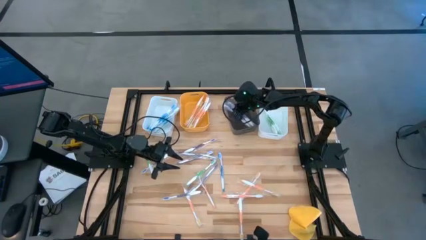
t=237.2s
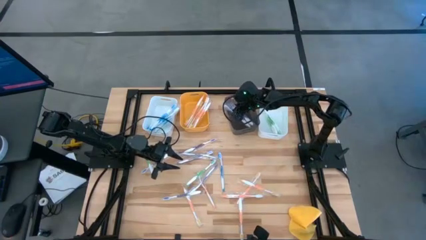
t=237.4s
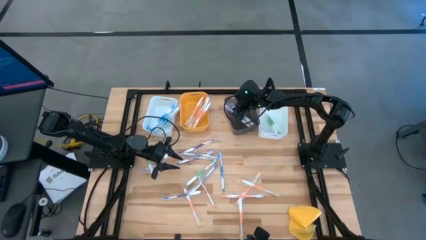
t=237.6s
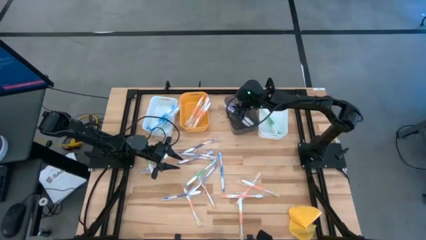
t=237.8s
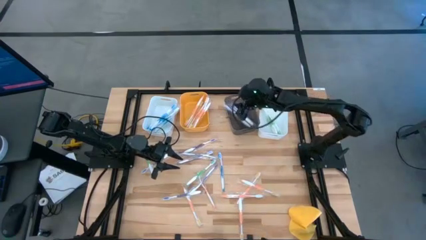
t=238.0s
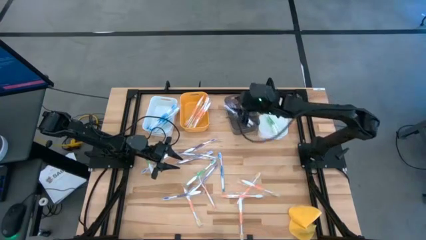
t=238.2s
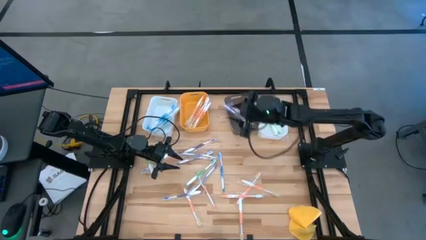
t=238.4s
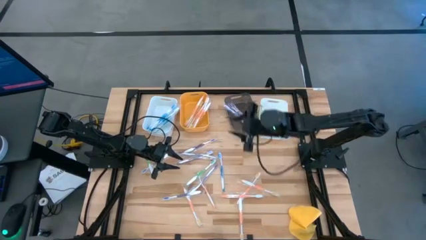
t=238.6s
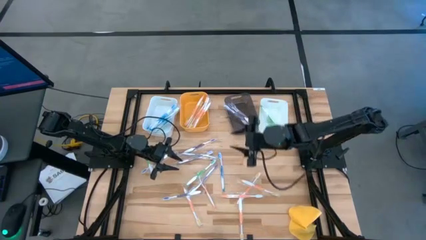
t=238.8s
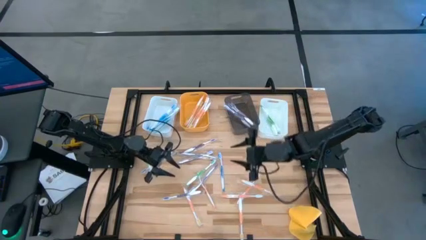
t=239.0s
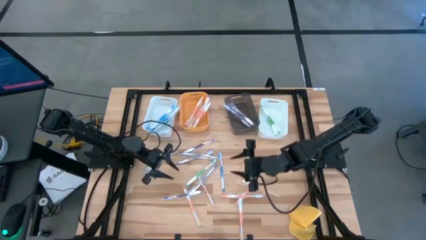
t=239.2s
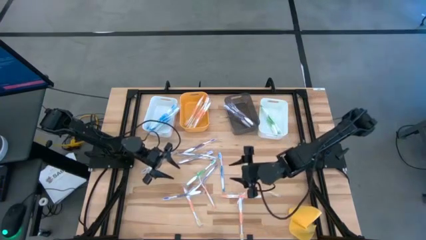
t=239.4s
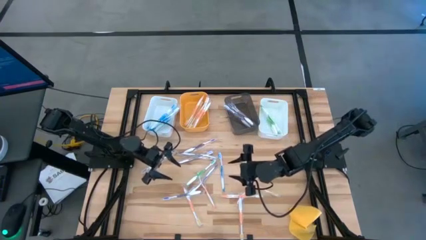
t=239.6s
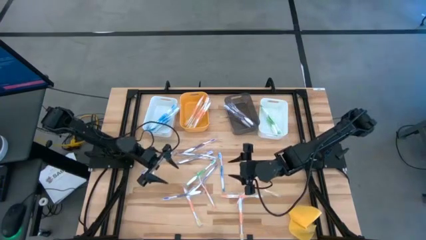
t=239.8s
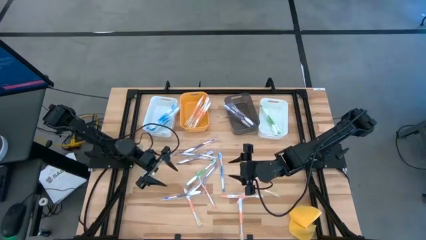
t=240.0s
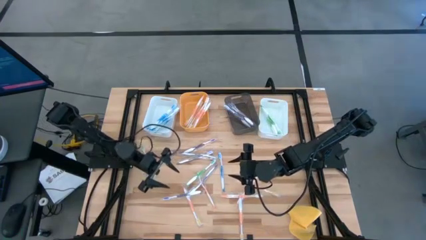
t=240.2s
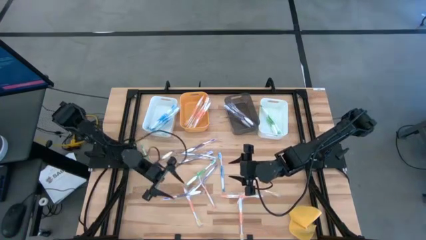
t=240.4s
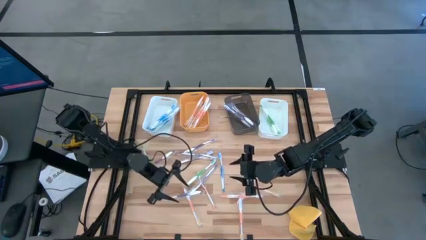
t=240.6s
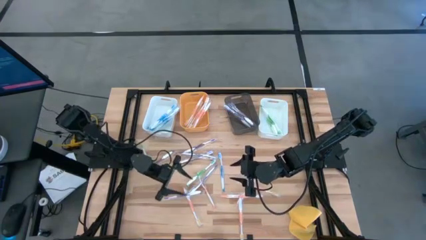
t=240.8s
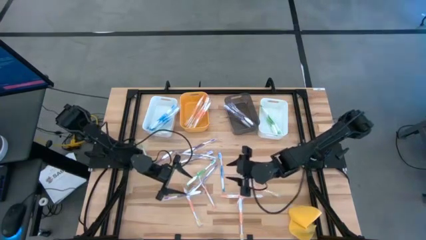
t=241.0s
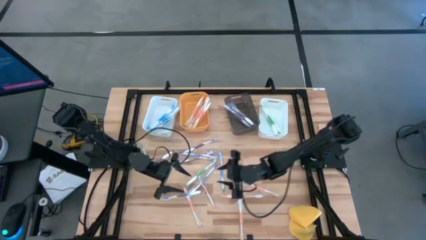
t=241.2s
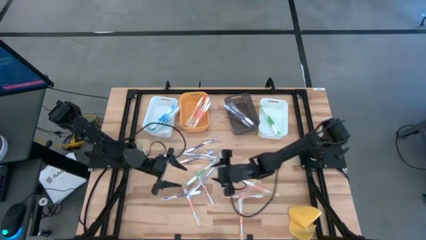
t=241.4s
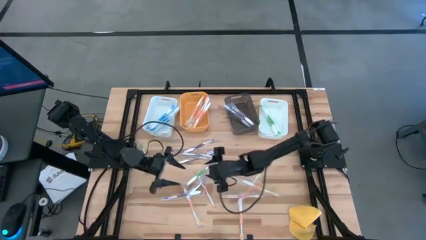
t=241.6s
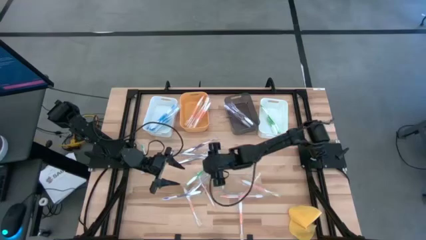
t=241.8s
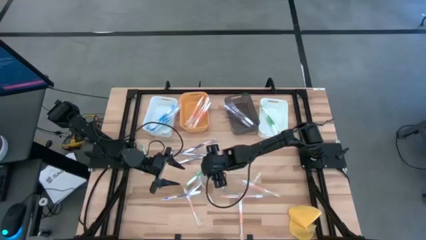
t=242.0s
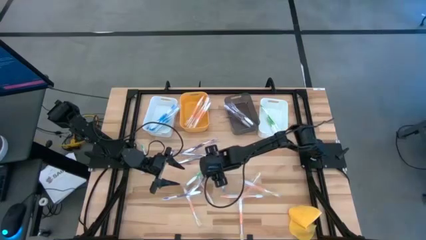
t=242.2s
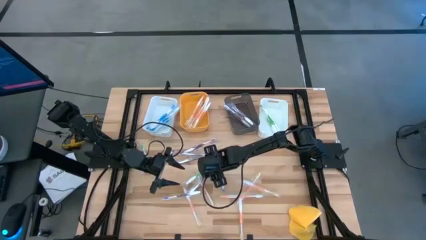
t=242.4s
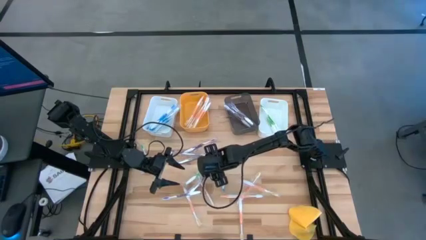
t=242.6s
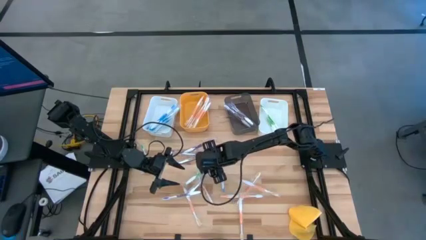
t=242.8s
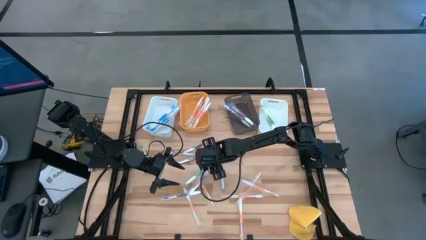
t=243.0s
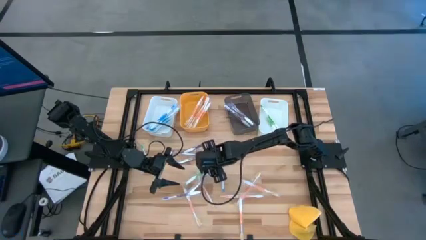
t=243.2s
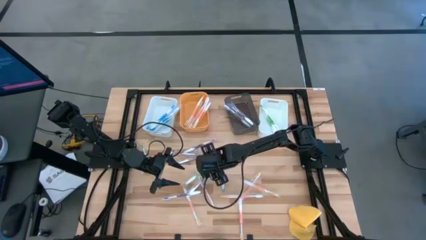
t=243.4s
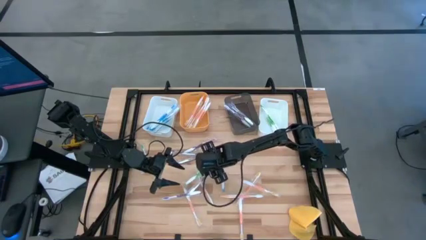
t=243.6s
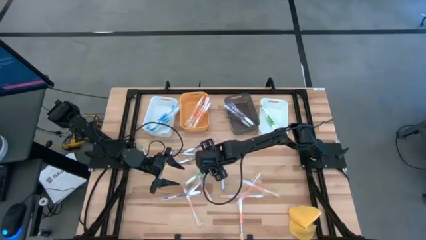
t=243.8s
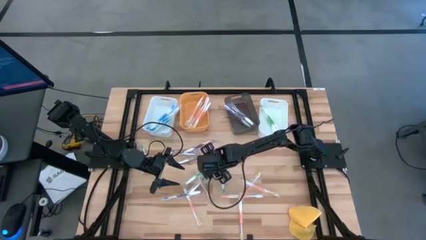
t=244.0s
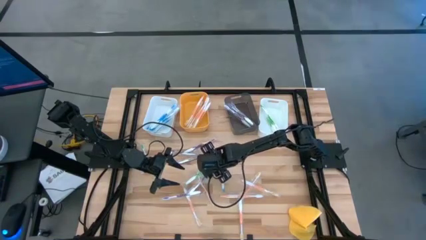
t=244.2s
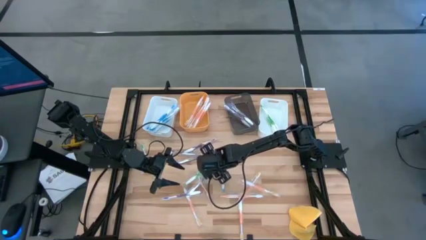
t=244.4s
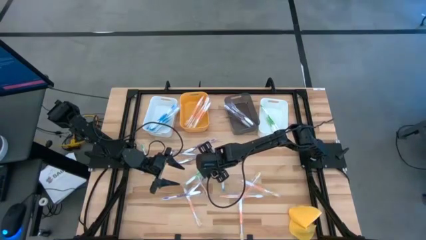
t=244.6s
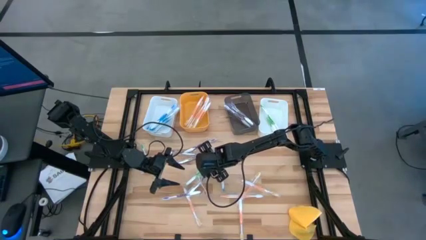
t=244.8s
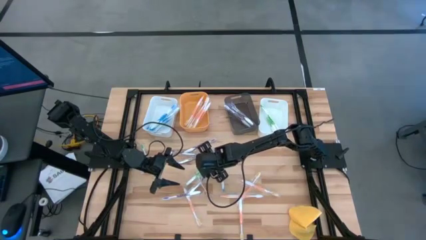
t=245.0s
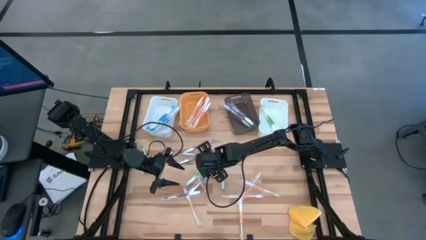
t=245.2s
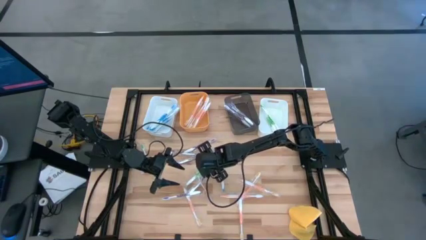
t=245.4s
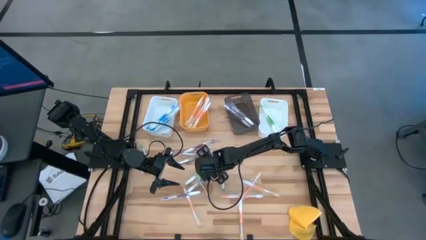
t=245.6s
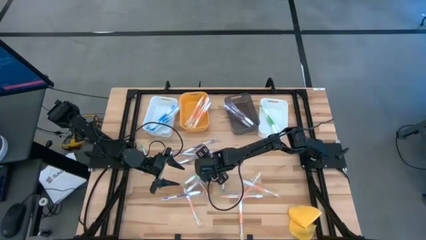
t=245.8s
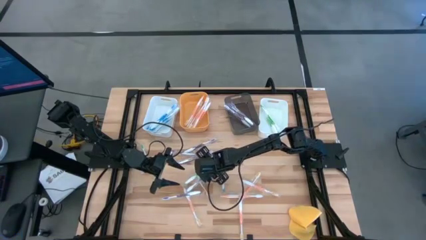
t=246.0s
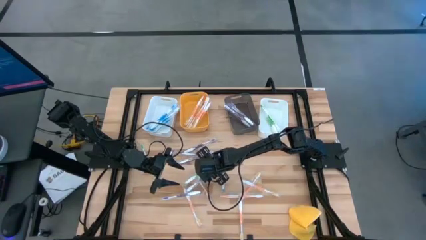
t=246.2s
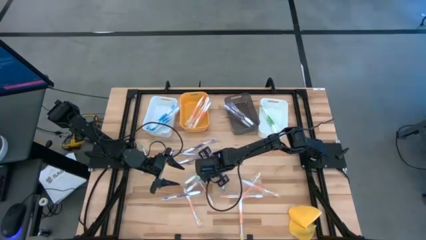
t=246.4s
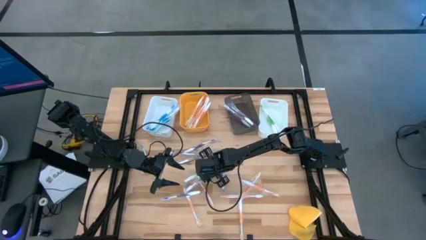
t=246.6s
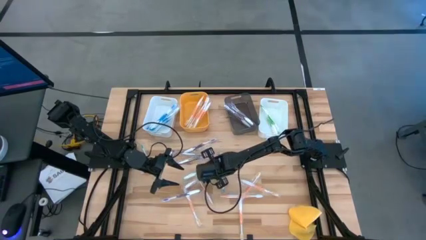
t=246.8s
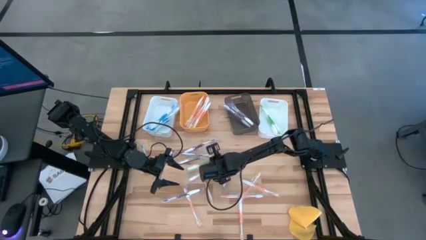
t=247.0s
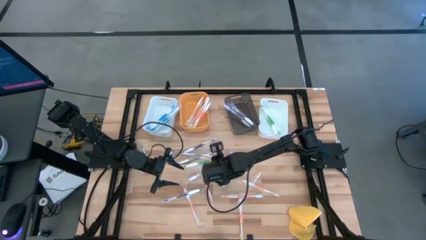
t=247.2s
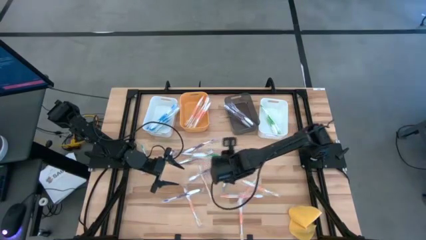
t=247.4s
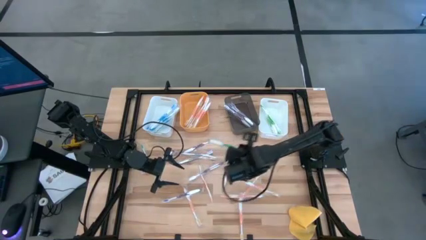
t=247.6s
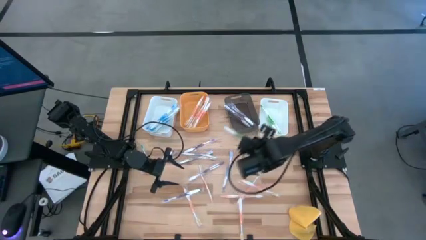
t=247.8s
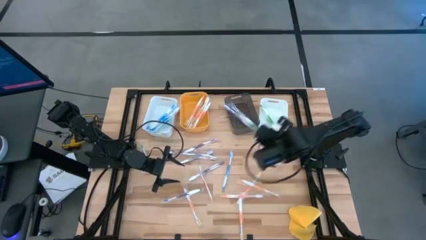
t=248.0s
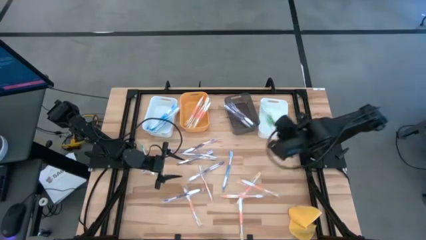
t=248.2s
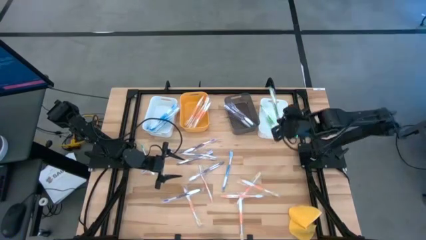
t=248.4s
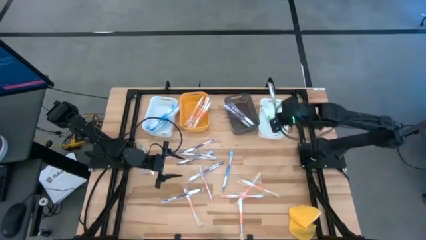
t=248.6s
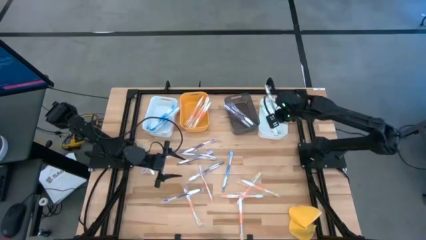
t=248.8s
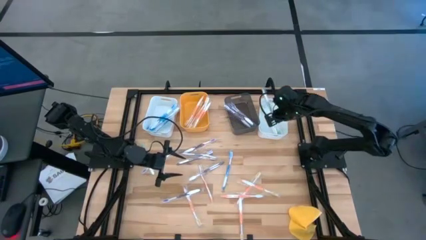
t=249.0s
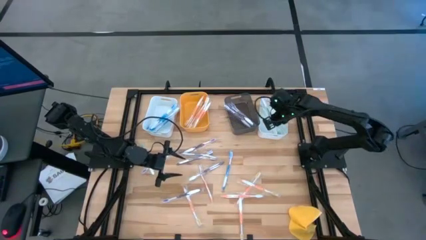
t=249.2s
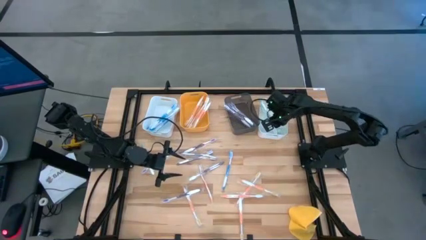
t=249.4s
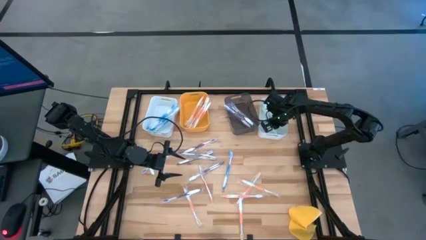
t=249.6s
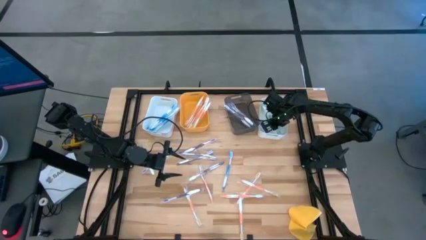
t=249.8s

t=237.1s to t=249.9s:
Task: Pick & Place Toothbrushes
Put the green toothbrush into right white the bin

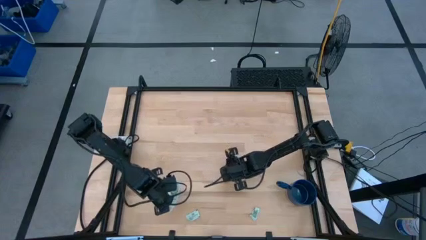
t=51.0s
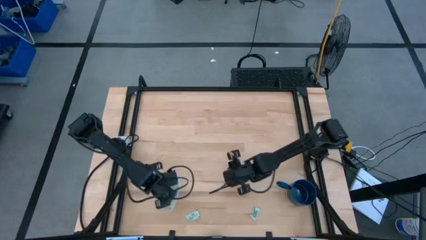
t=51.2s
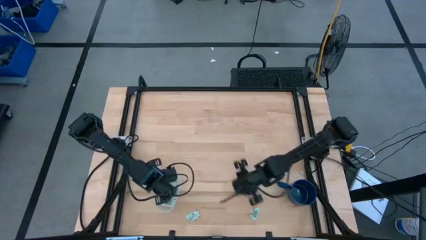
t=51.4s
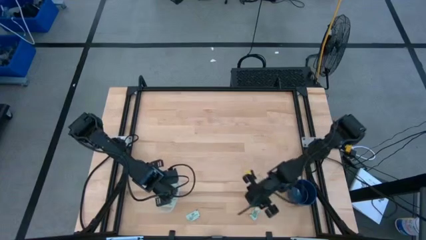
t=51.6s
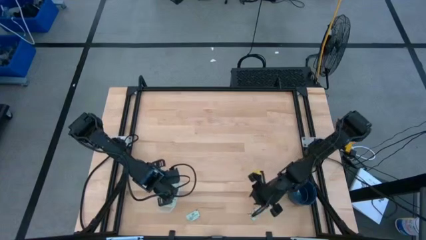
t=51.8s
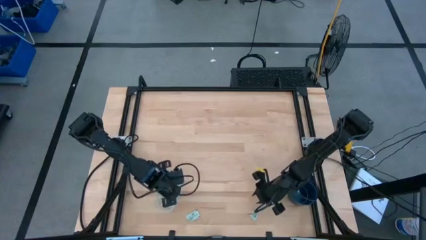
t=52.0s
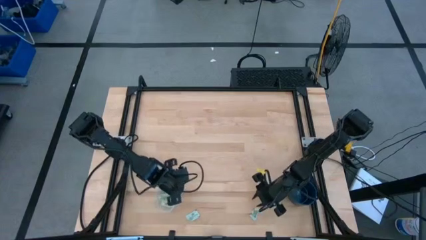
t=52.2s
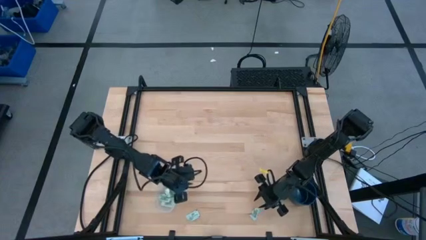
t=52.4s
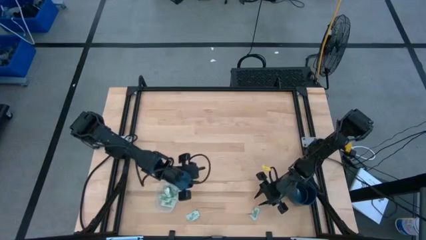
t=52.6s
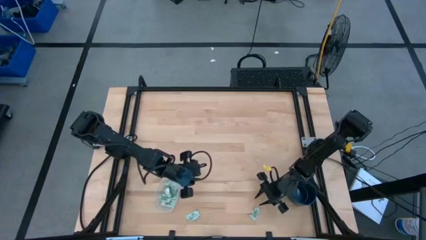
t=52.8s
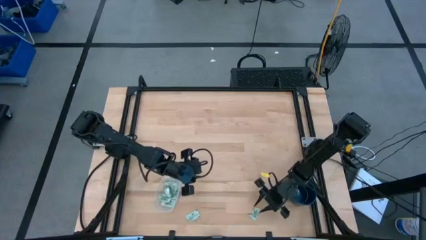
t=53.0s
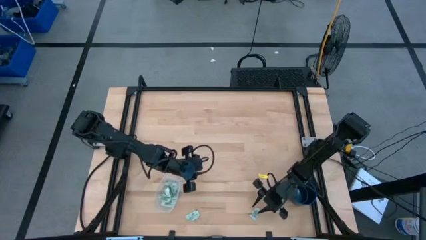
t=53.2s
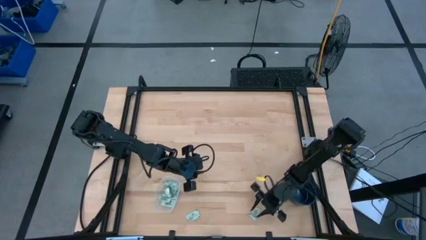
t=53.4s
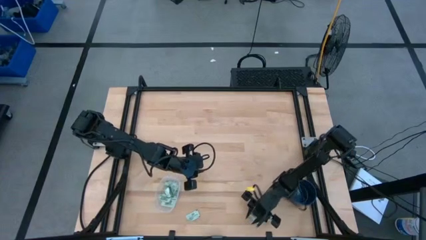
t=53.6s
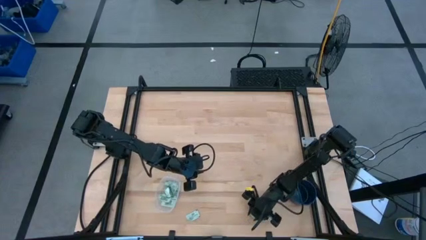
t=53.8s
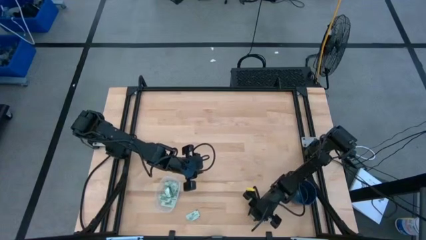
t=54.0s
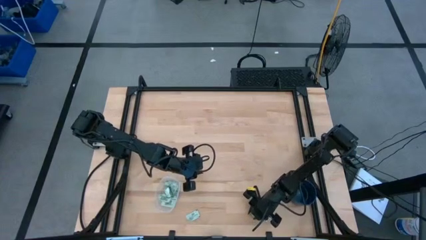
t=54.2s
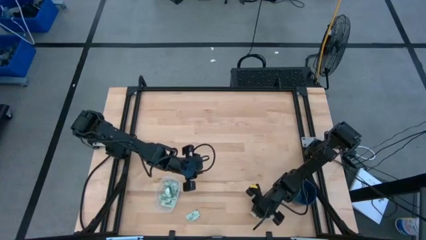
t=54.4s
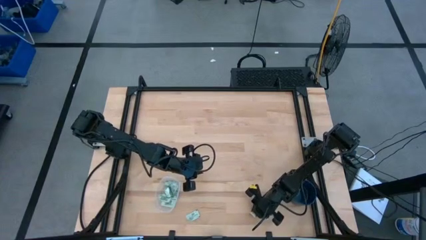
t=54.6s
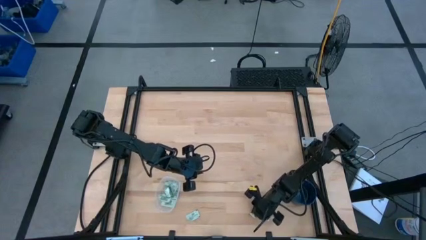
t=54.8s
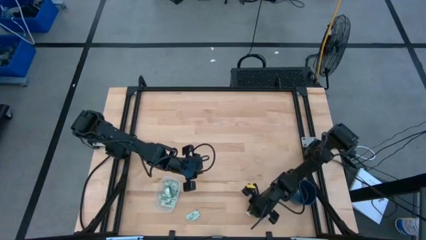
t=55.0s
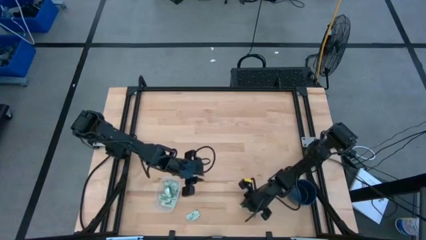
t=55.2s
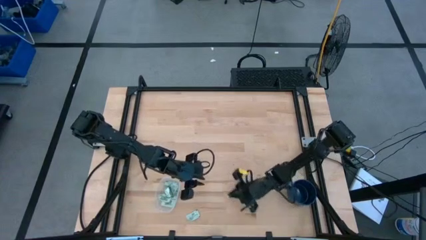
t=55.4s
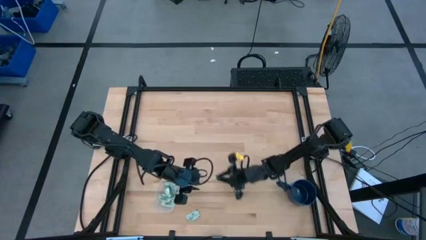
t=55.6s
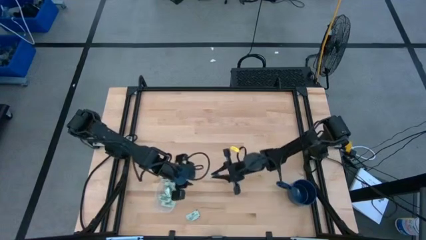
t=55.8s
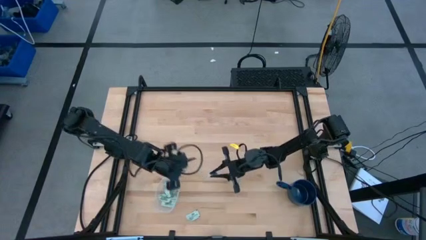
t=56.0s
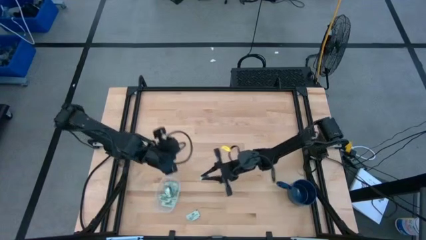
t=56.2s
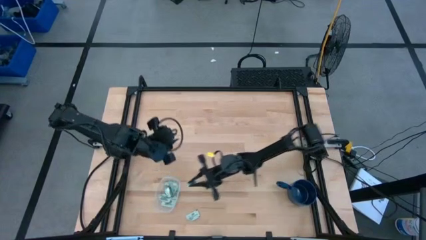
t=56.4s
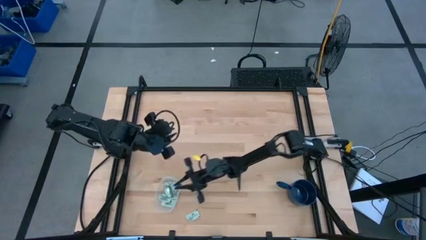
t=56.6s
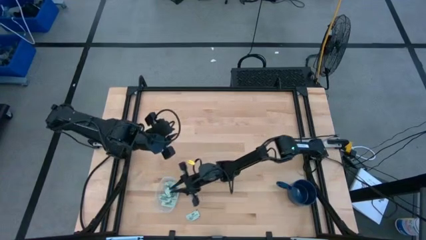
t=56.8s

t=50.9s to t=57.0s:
Task: Pick and place Stevia / Truvia into bins
Put the stevia packet into the transparent container
